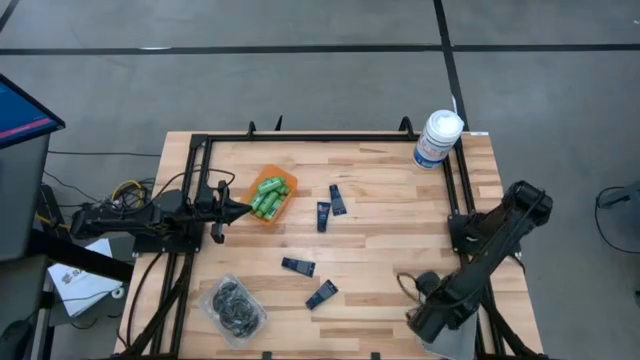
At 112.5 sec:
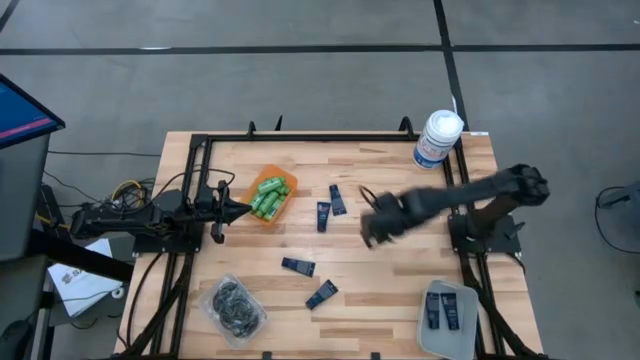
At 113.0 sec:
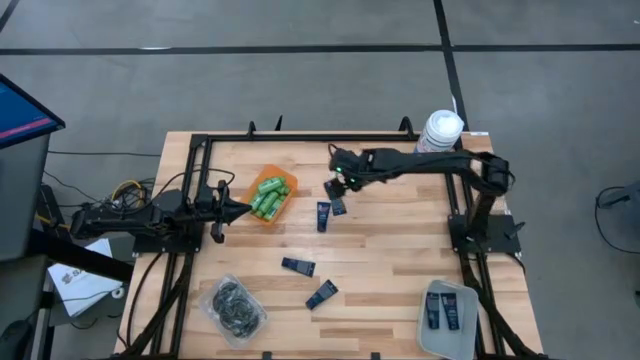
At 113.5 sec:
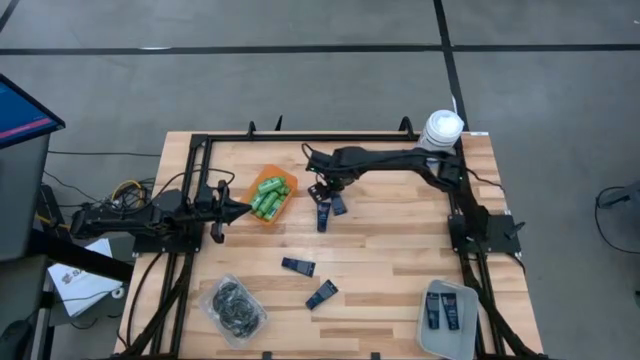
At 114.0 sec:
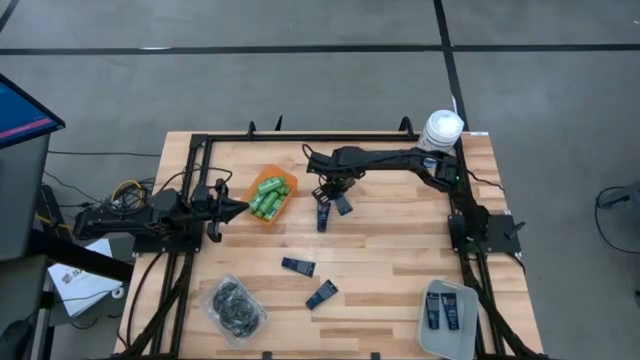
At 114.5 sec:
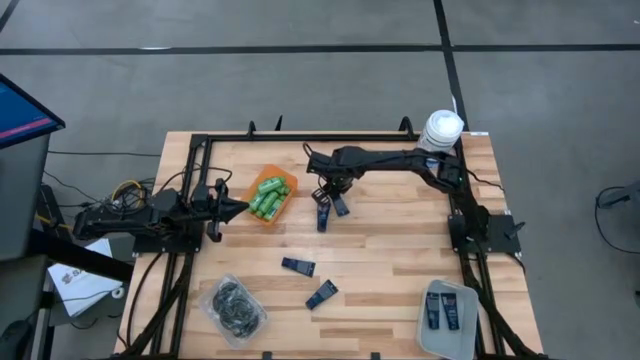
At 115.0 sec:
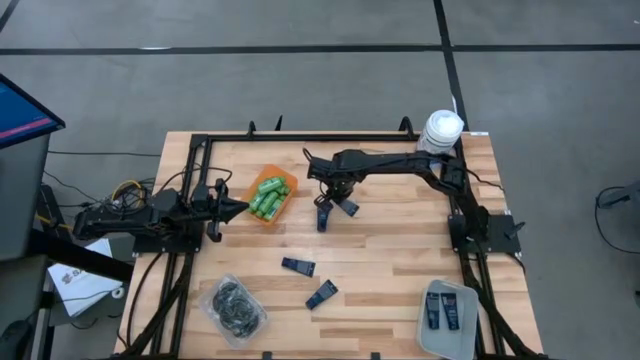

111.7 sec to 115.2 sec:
Task: Pick & Place Travel size toiletries
Put the dark blue shaving cream into the gray bin

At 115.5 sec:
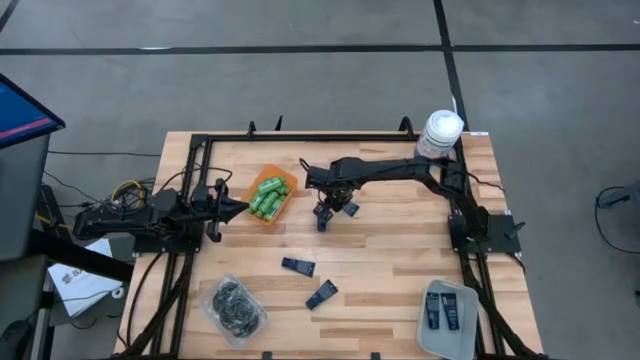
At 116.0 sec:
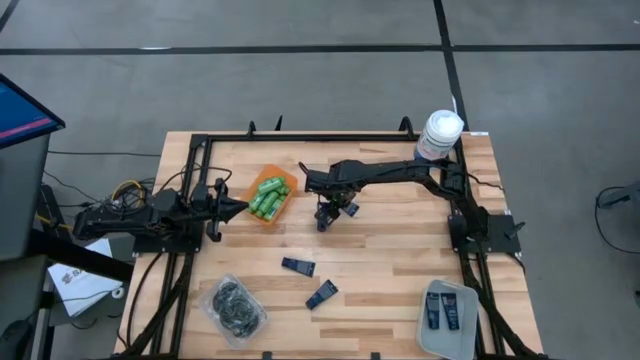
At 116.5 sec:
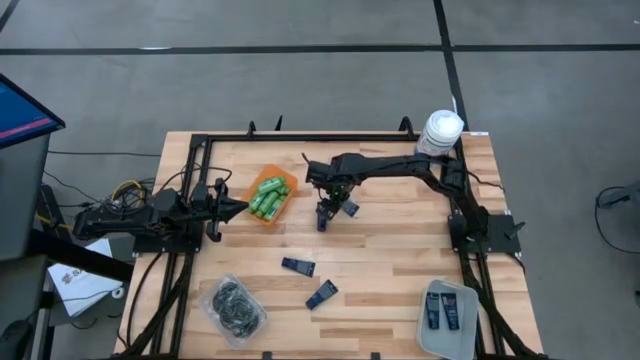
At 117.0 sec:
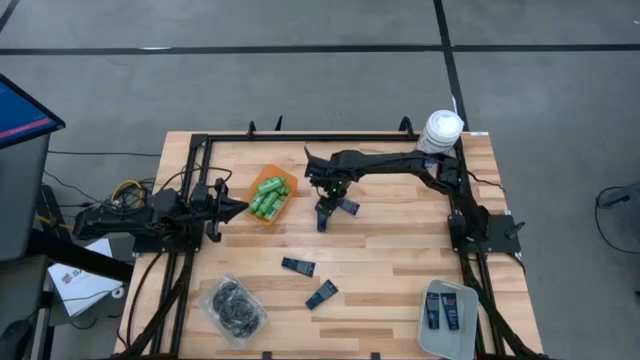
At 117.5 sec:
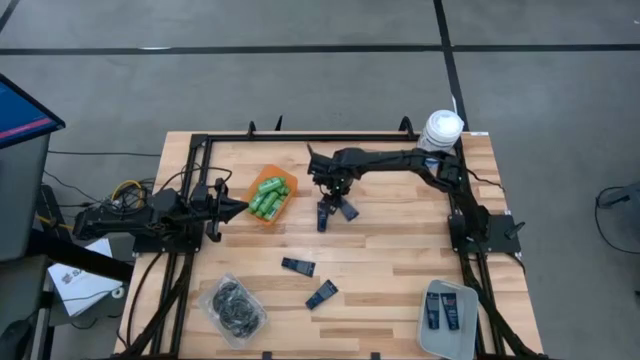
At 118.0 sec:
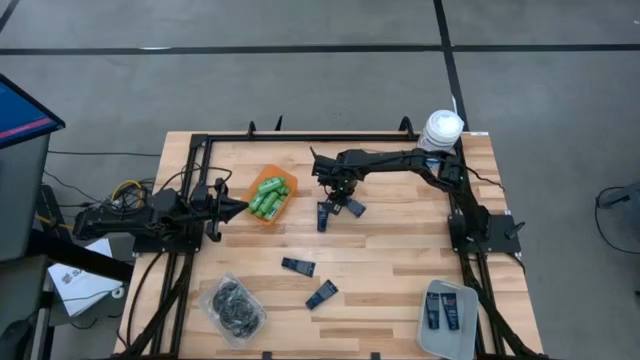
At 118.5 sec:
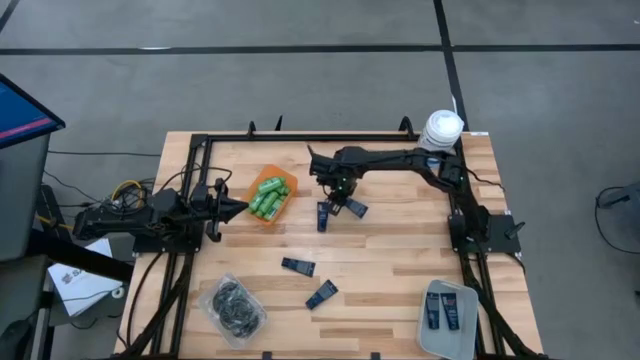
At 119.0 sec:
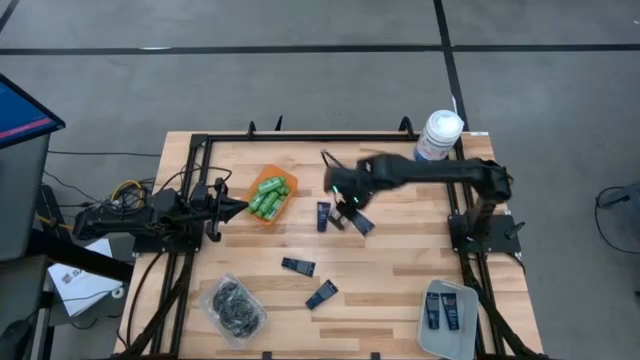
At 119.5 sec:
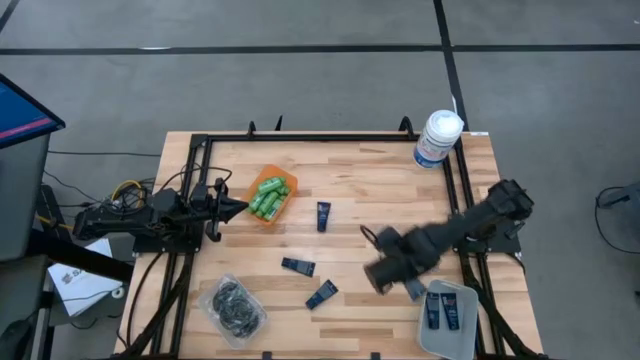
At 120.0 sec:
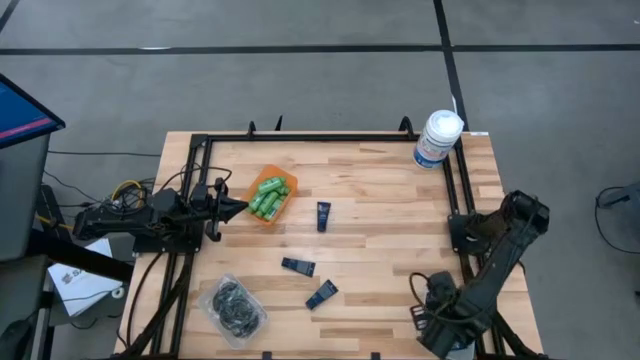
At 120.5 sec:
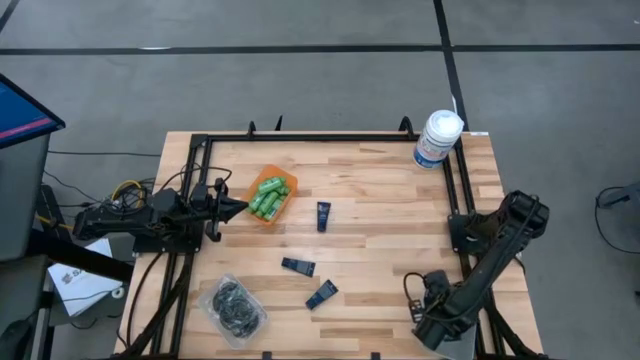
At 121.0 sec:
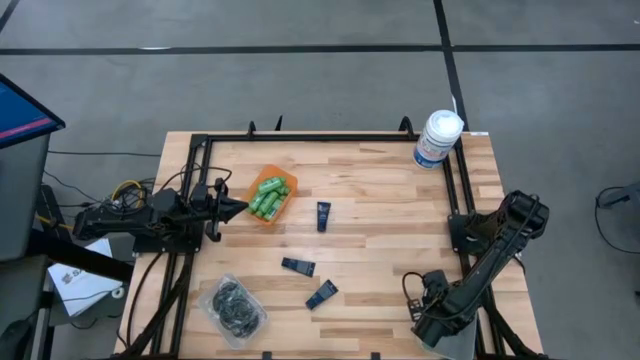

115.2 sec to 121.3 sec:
Put the dark blue shave cream into the gray bin

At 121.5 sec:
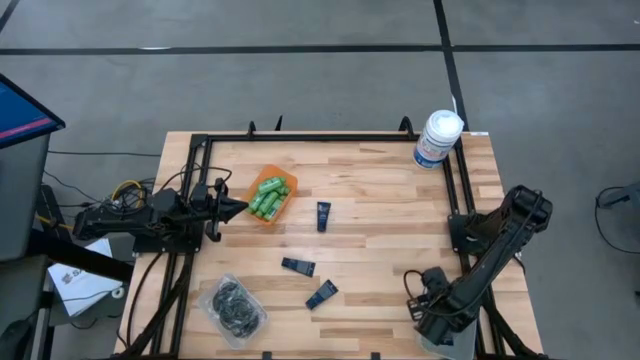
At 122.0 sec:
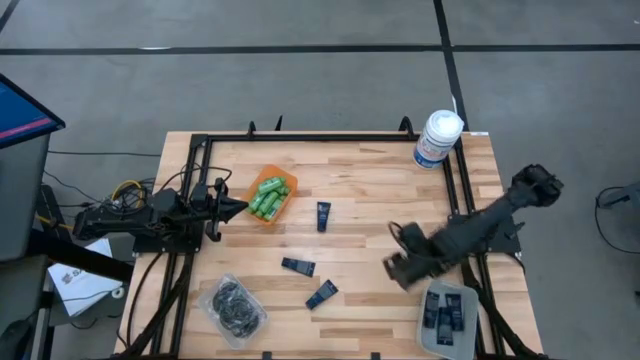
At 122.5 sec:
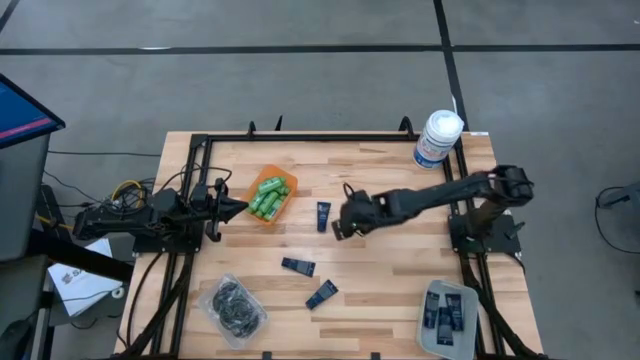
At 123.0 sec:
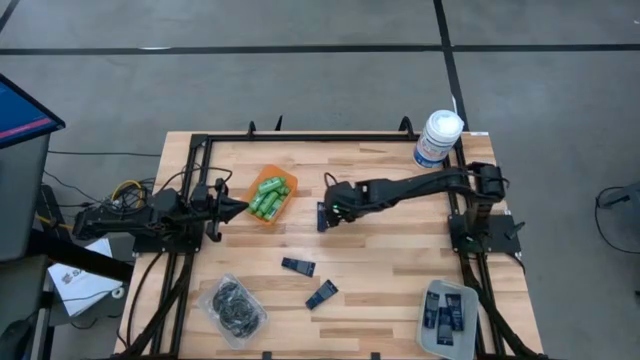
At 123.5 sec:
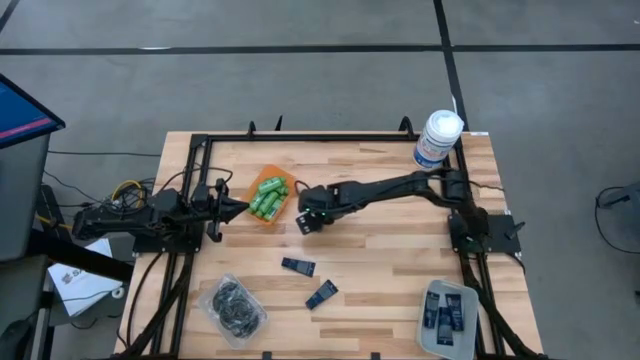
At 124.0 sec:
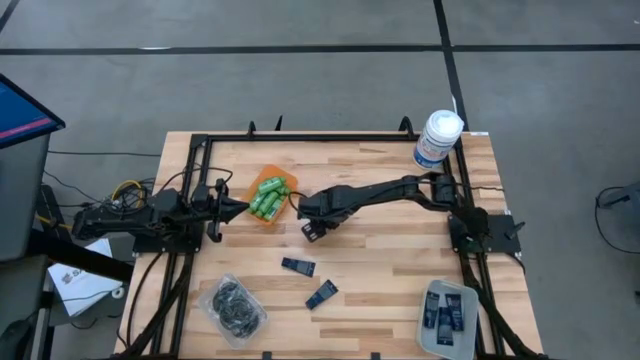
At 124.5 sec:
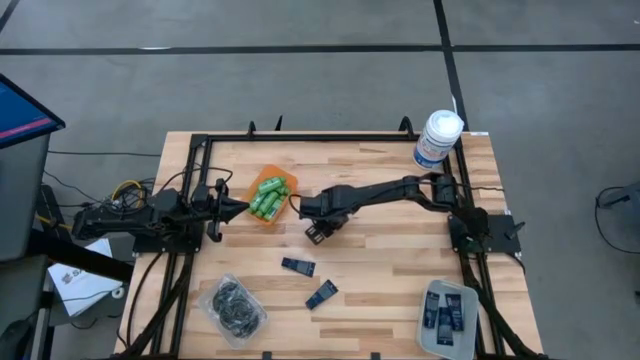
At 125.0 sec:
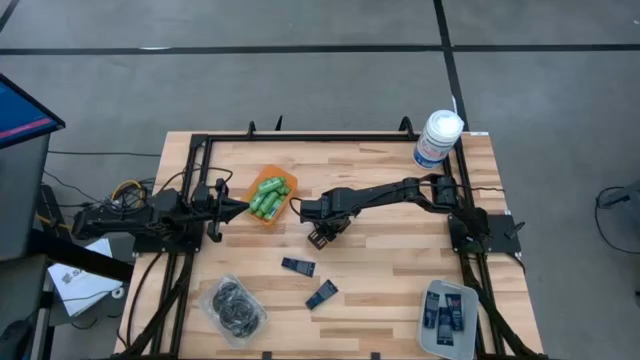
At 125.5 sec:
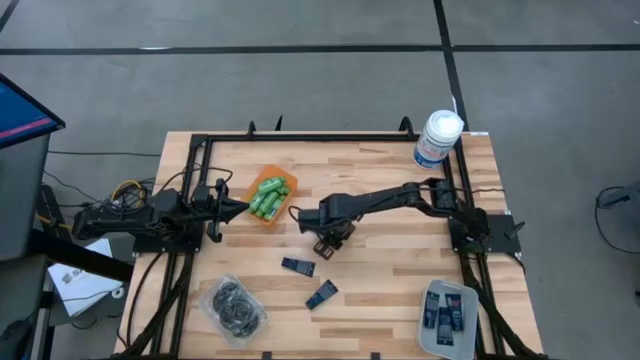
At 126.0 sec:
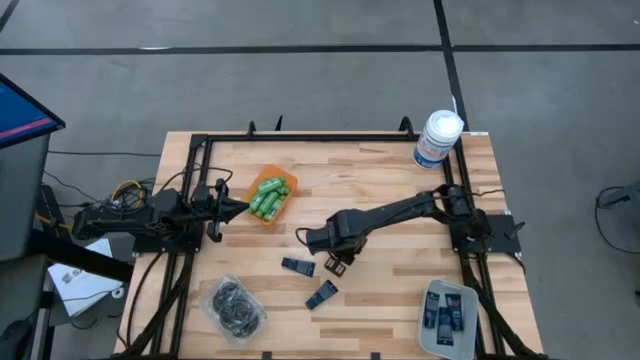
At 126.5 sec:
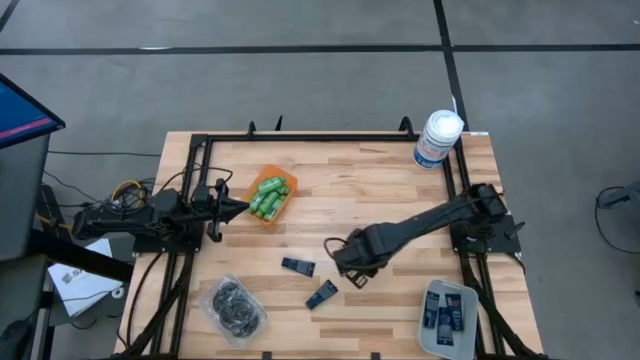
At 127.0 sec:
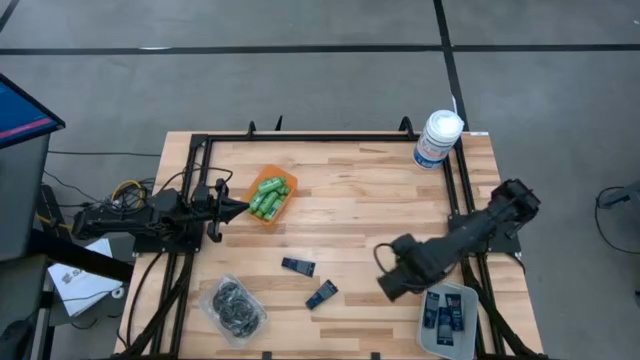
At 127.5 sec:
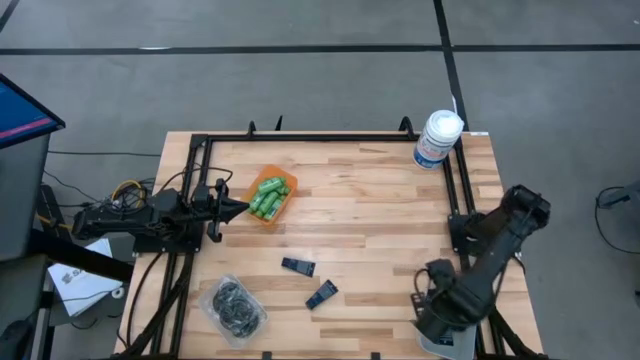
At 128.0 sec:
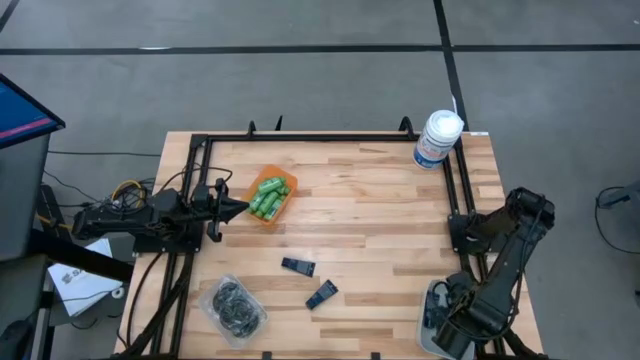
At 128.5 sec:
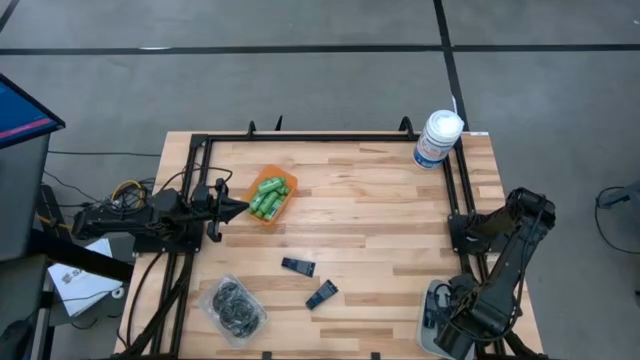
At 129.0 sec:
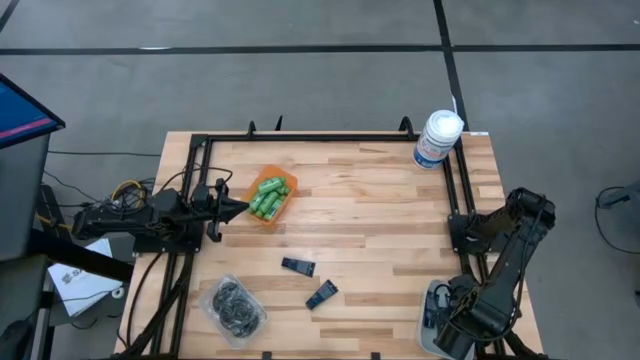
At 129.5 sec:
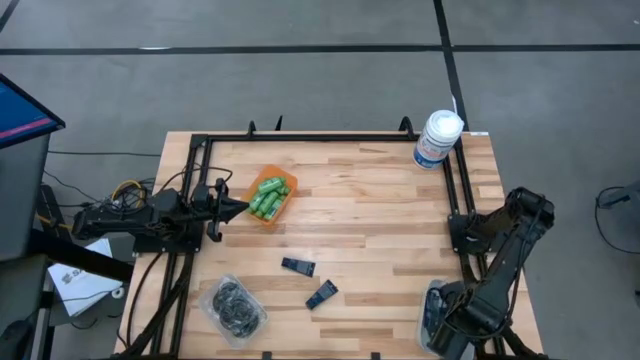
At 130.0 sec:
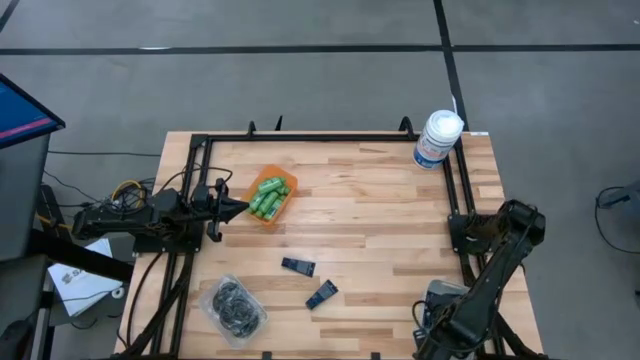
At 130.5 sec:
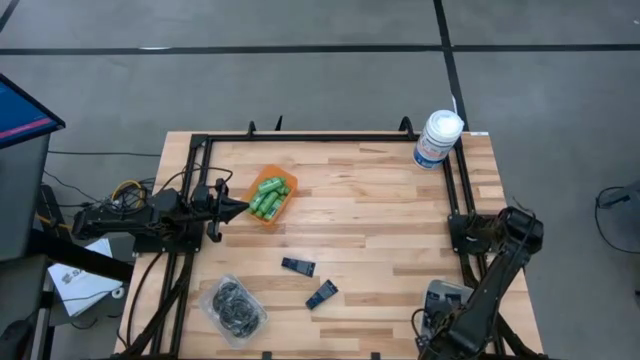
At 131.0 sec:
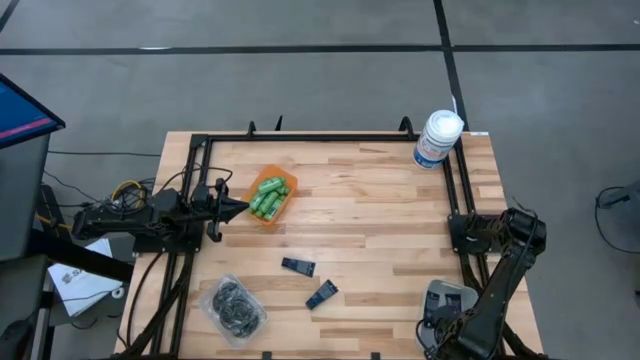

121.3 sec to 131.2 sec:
Put the dark blue shave cream into the gray bin
